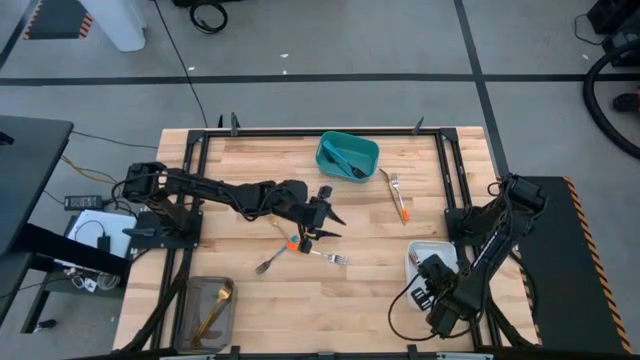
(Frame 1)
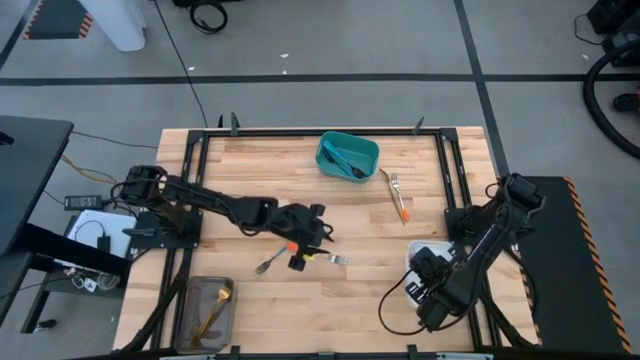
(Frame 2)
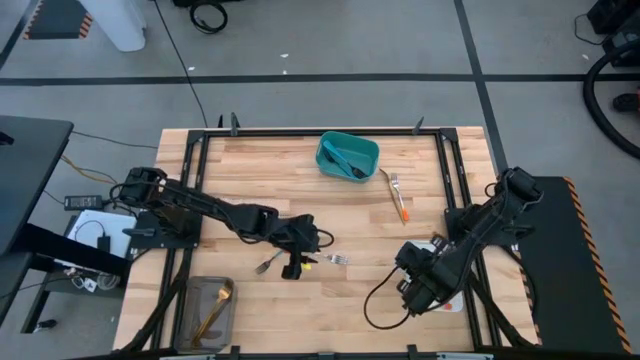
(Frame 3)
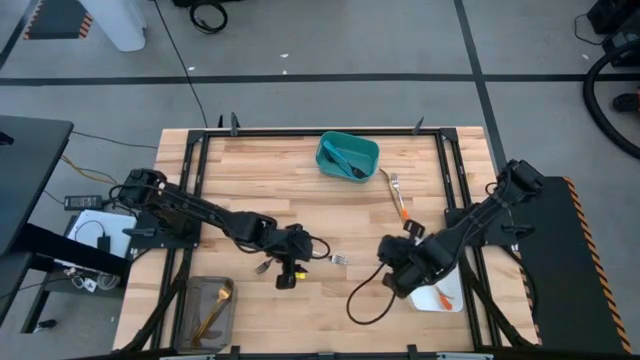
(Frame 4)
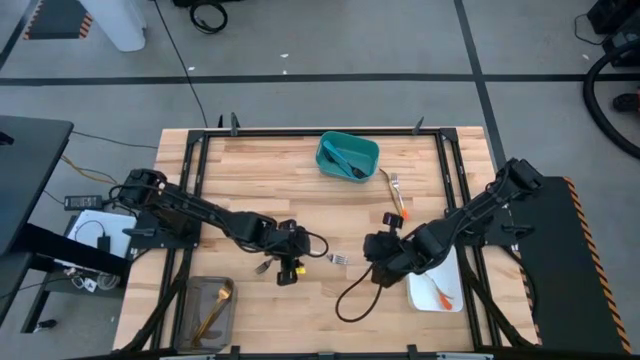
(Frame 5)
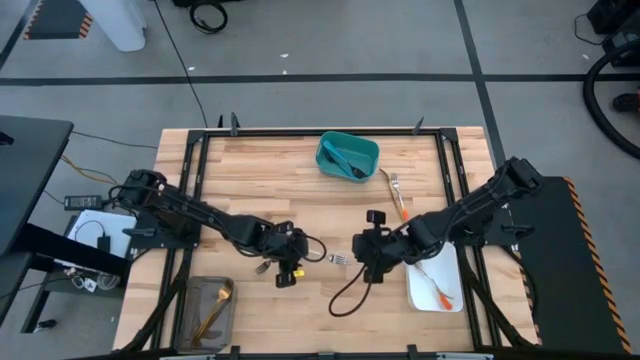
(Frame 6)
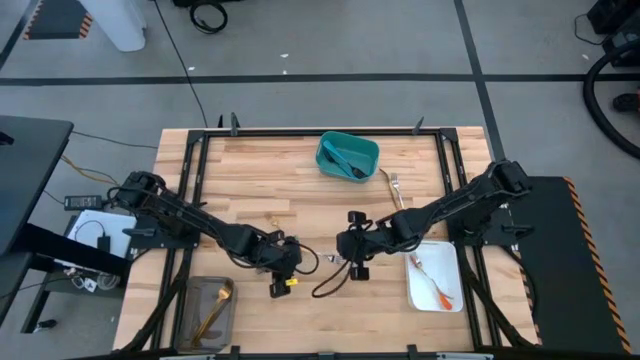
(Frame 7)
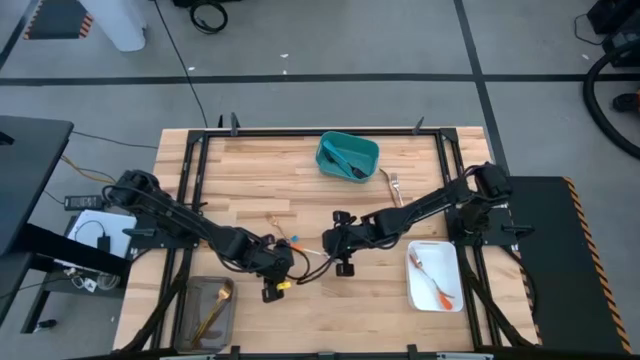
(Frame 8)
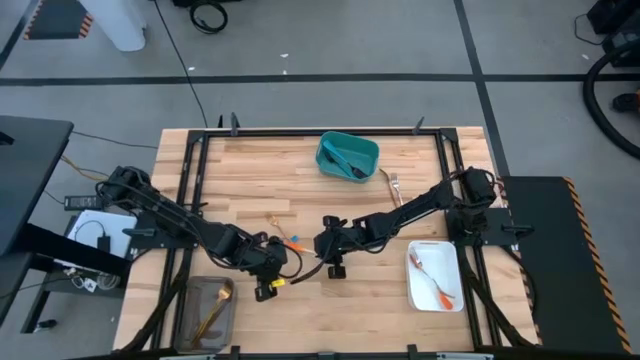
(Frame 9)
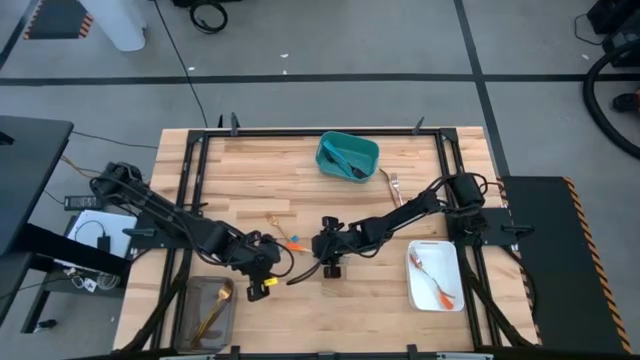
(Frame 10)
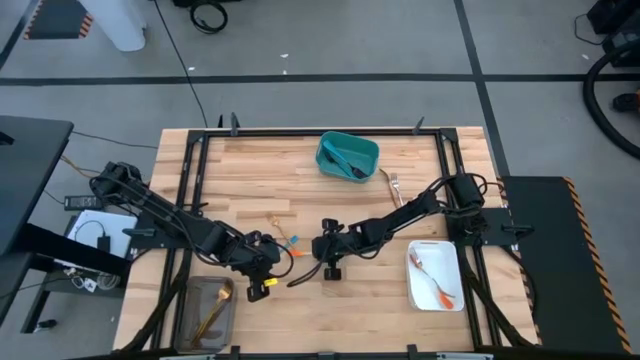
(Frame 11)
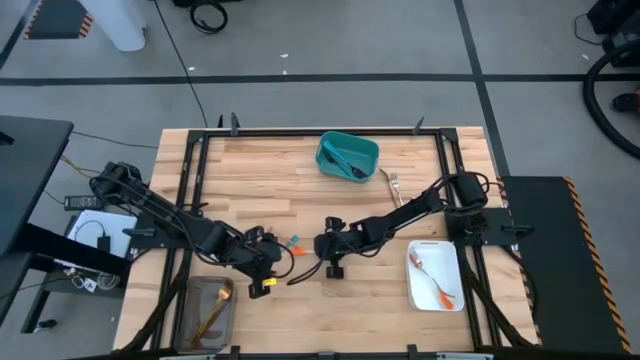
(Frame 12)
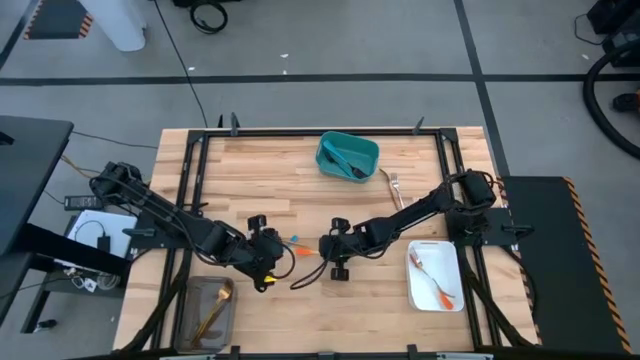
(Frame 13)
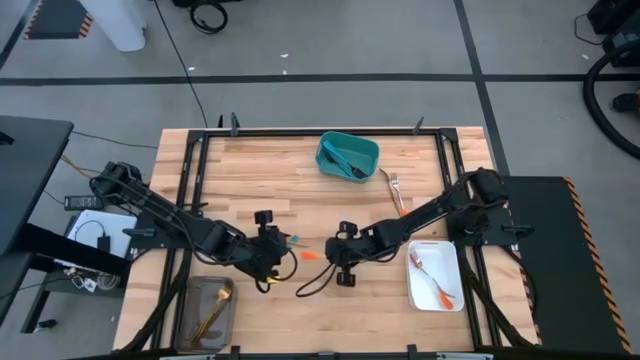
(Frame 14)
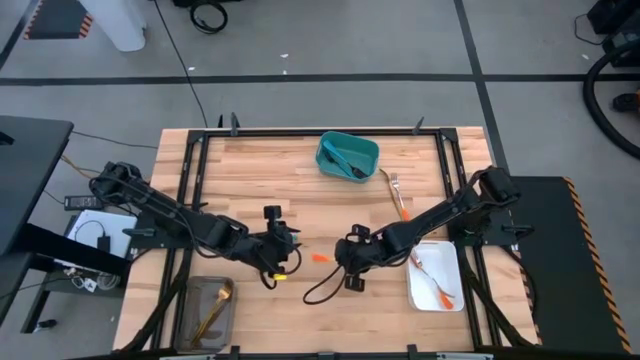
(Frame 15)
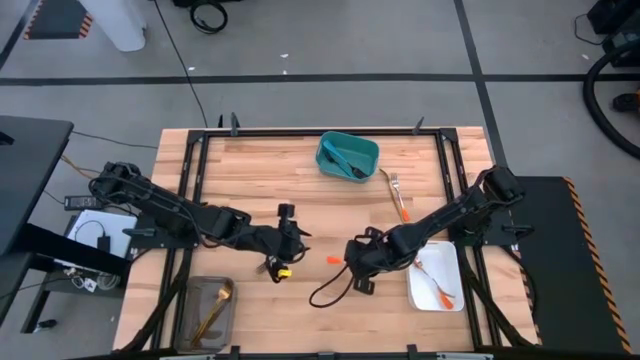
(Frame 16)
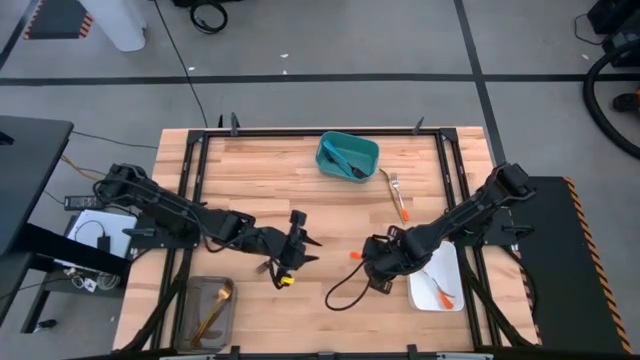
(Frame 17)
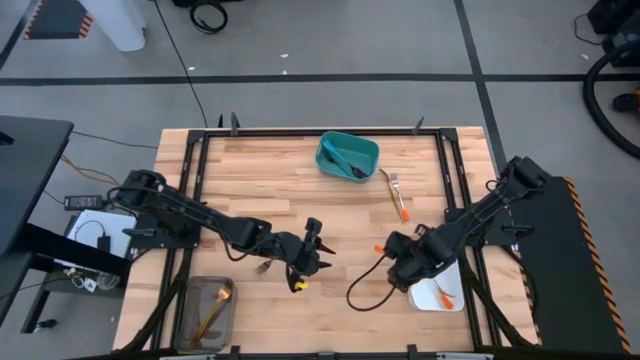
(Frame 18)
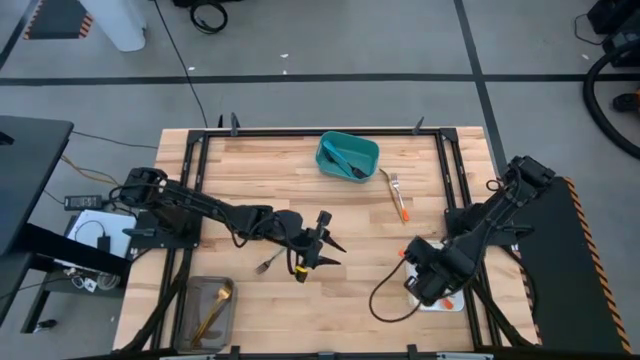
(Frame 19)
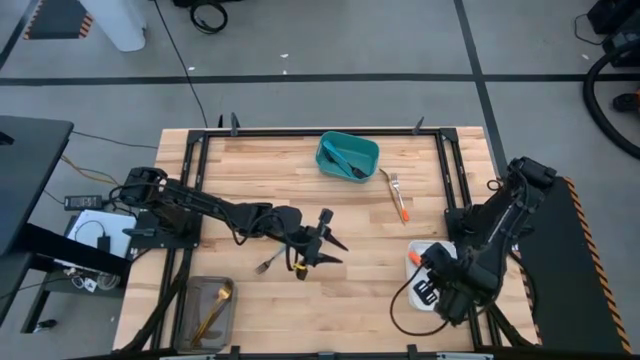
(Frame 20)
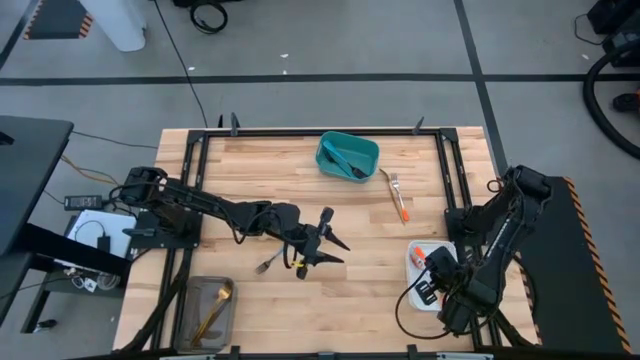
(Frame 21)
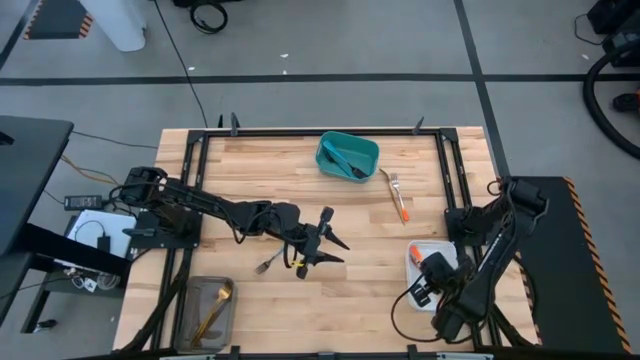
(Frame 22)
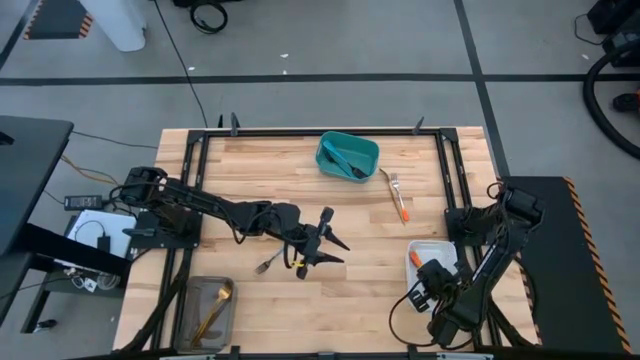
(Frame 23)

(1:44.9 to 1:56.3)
Task: Sort silverware by color (type)
Put the orange fork into the white bin

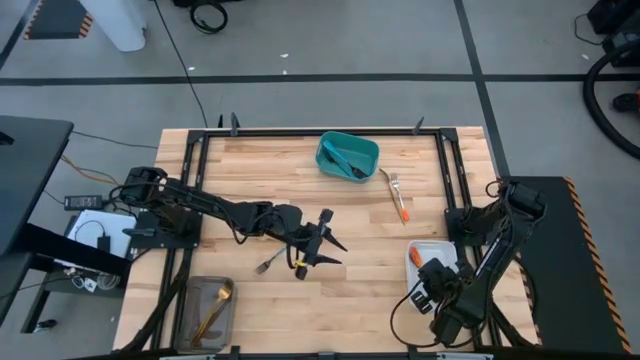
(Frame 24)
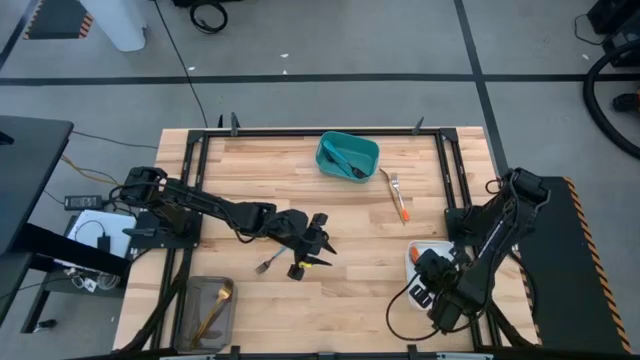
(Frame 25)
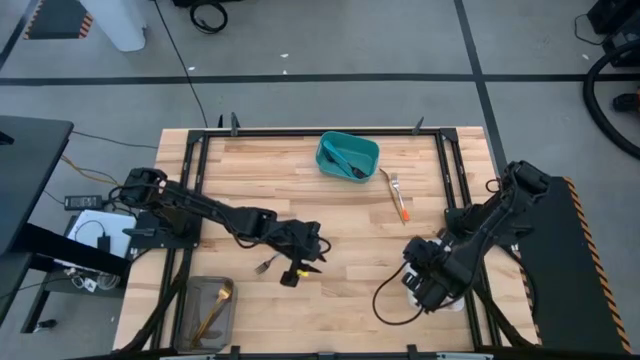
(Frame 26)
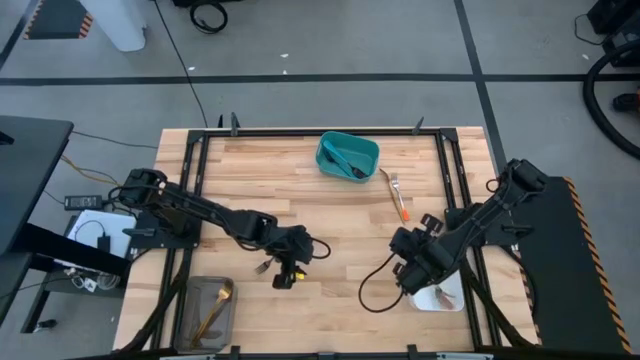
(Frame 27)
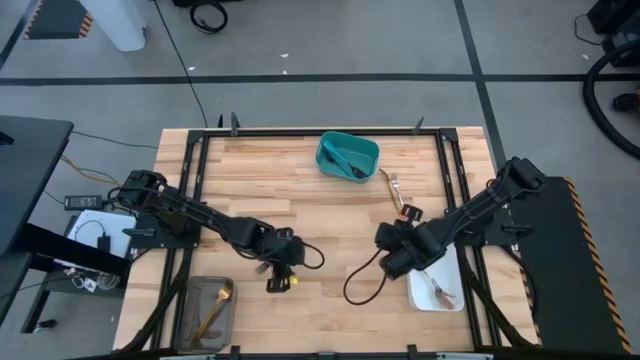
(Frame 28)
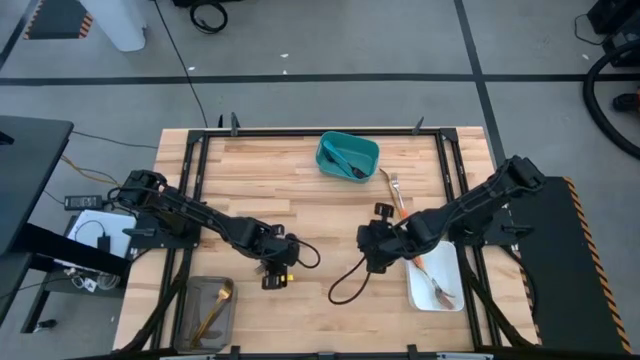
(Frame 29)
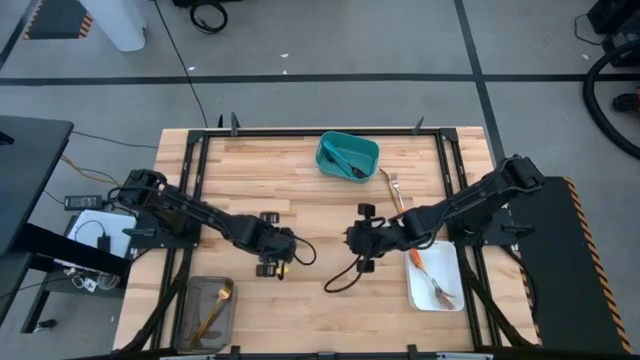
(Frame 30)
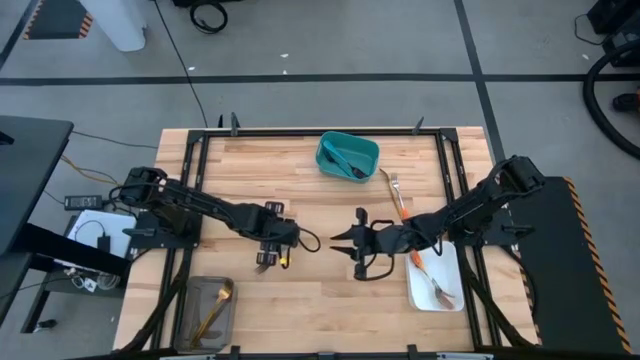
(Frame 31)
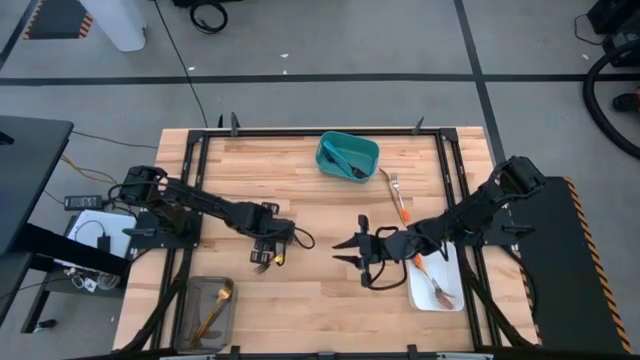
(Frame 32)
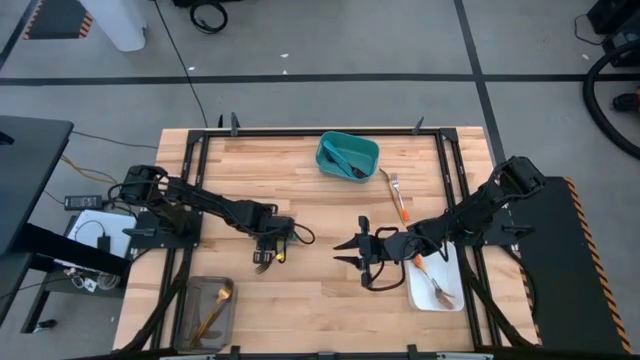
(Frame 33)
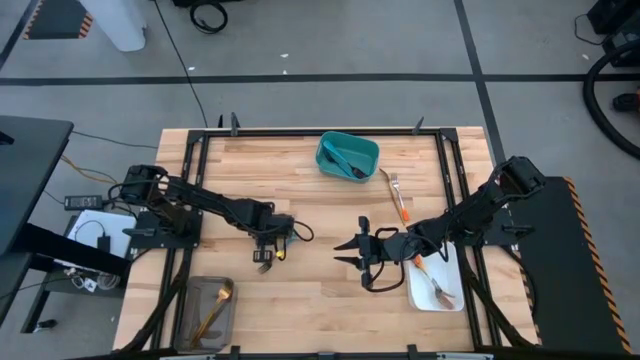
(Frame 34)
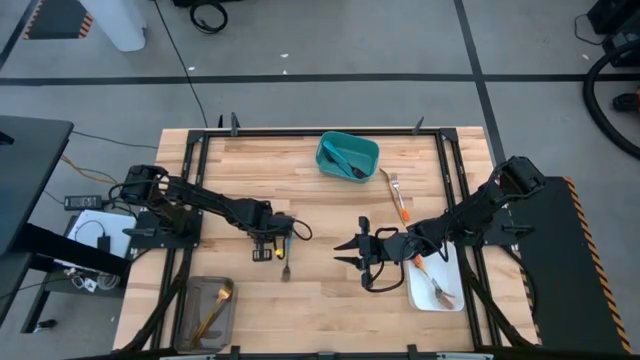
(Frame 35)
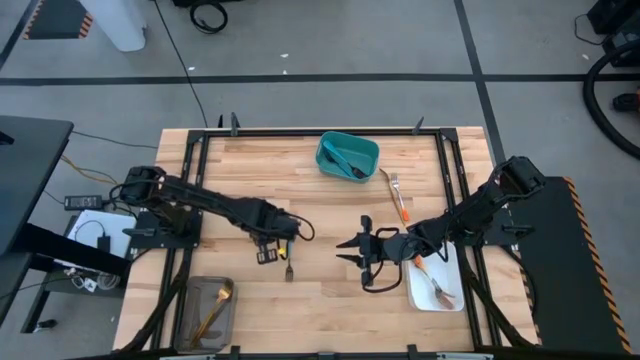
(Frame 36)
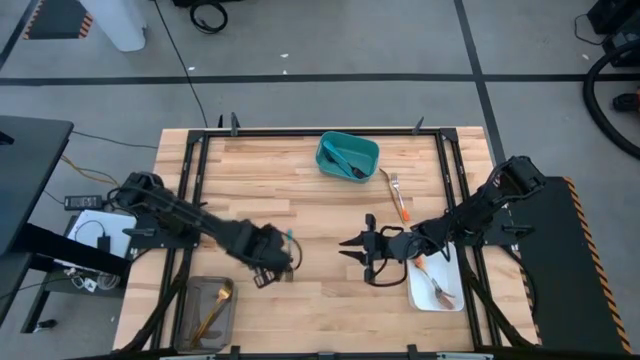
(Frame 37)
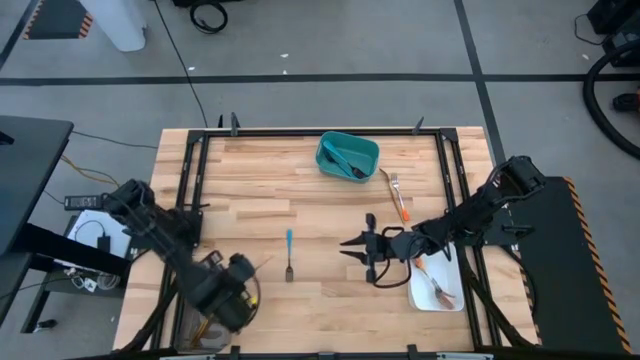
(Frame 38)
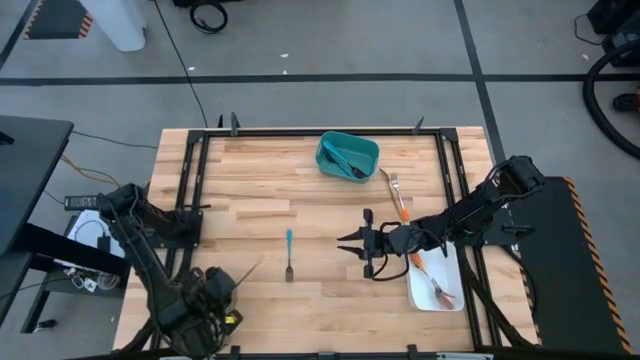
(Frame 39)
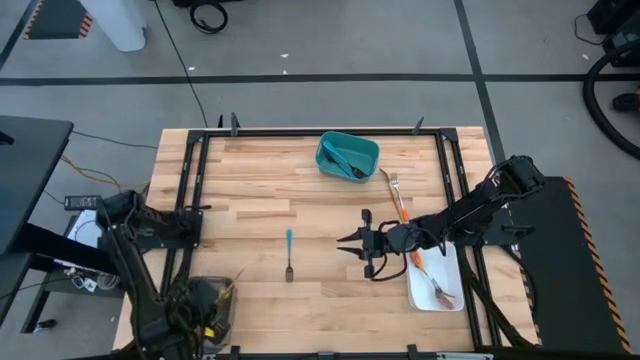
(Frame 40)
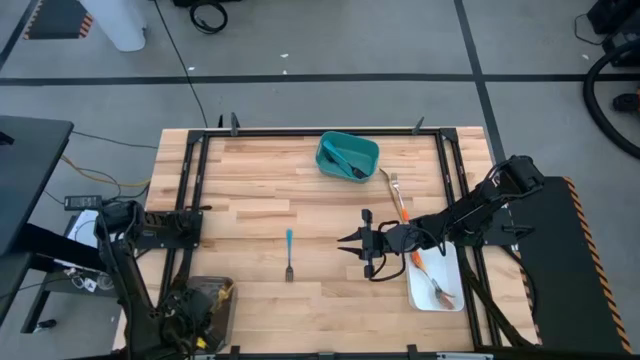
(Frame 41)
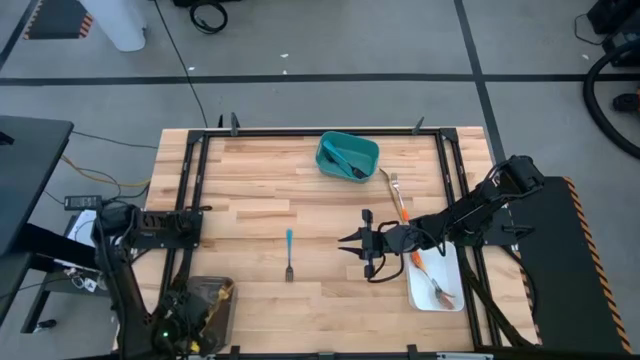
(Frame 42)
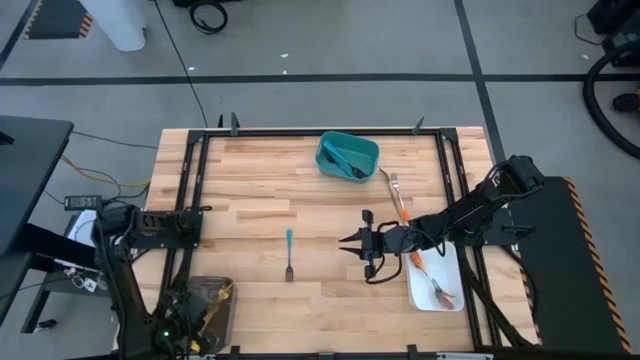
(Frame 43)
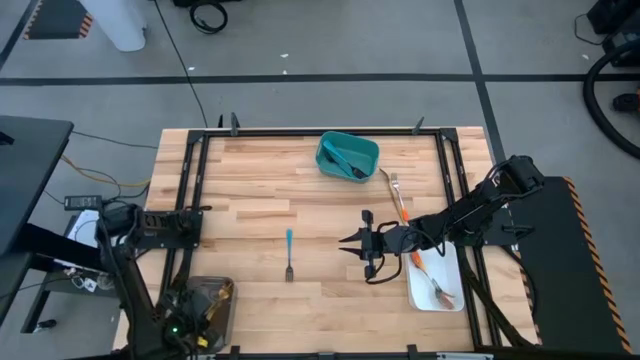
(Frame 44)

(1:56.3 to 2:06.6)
Put the gold fork into the black bin
